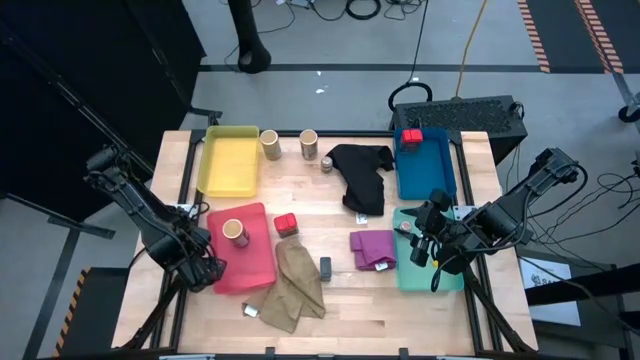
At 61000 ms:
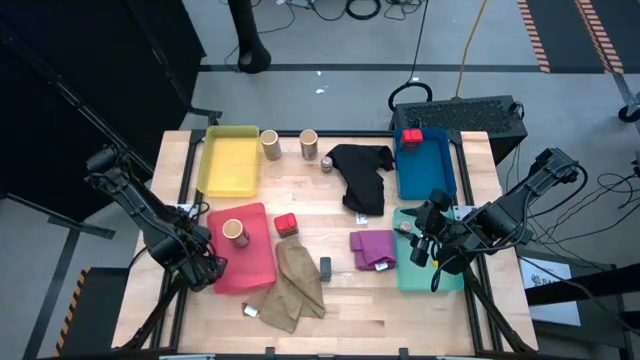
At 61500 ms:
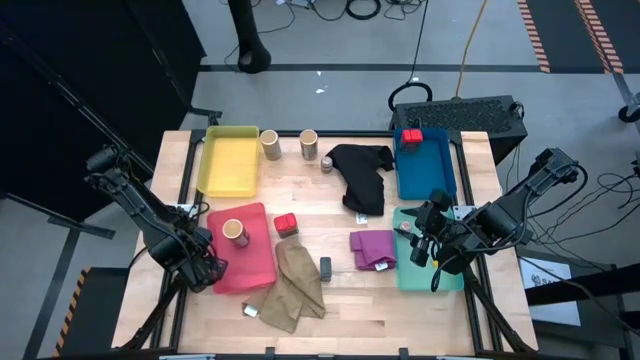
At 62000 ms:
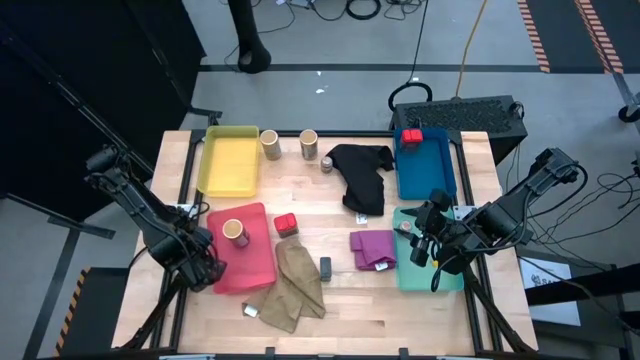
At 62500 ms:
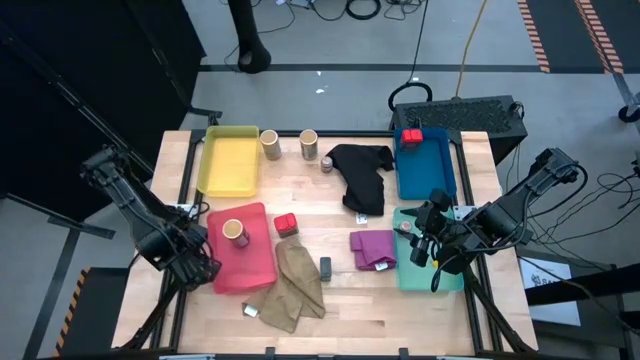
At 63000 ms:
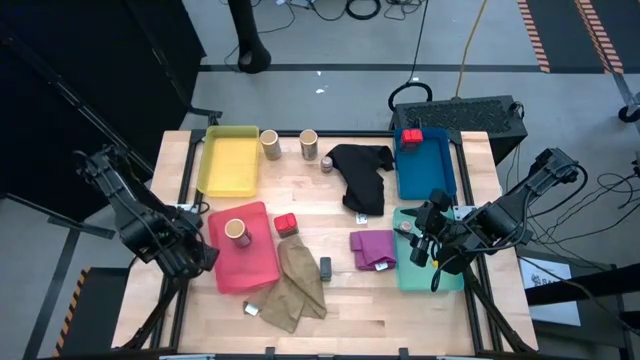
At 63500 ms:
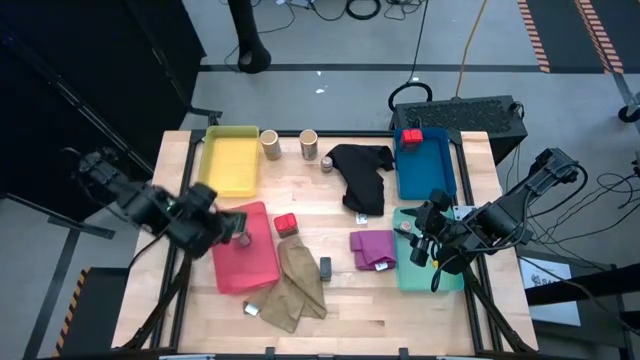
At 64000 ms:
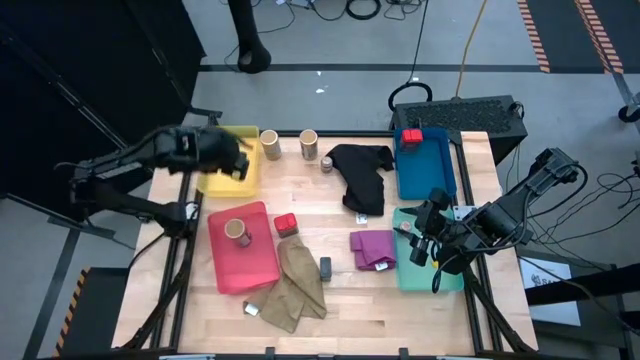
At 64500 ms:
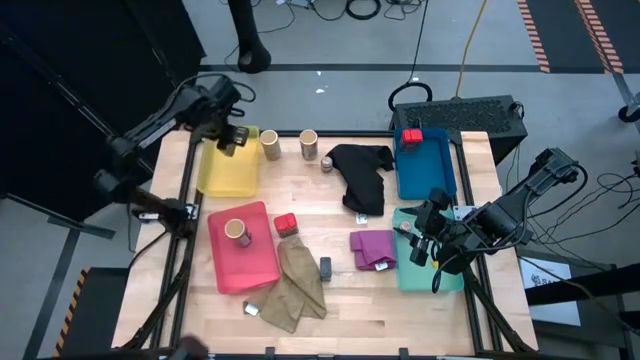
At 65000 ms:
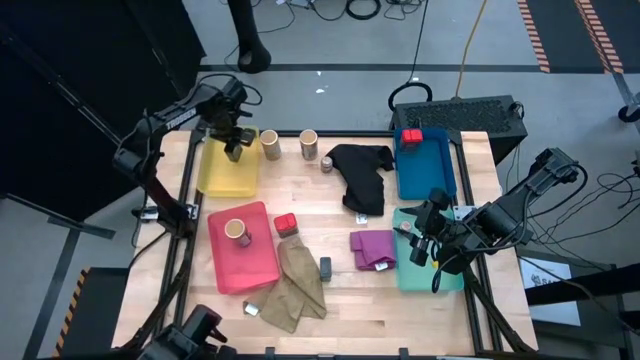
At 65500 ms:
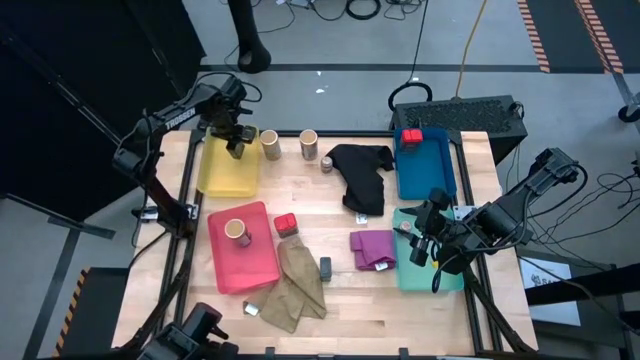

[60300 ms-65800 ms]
Task: Sort spices by type
Put the left black seasoning can into the yellow bin

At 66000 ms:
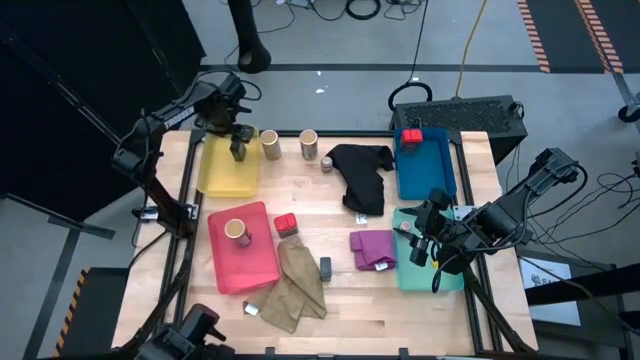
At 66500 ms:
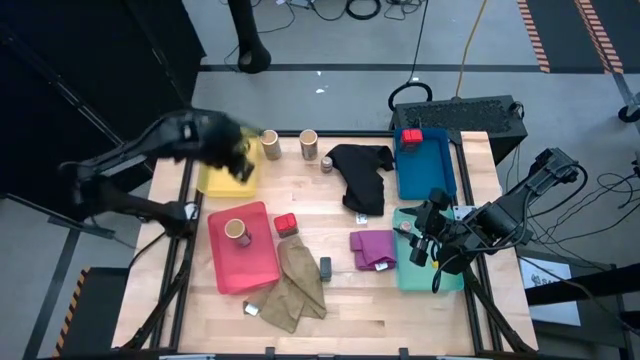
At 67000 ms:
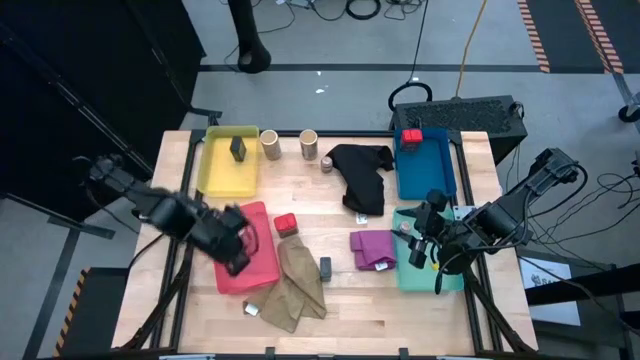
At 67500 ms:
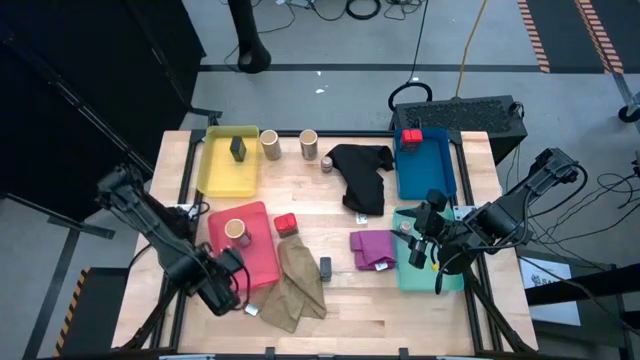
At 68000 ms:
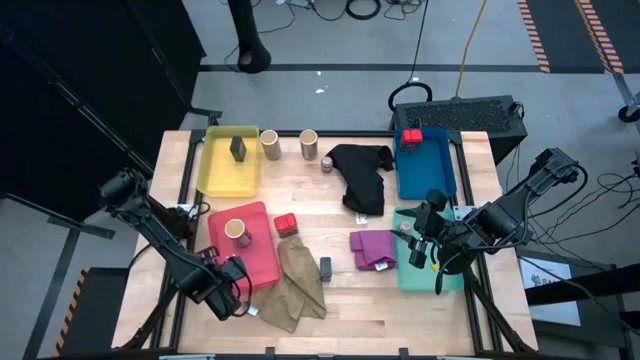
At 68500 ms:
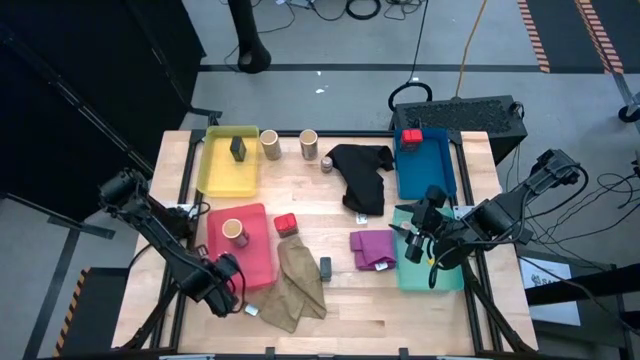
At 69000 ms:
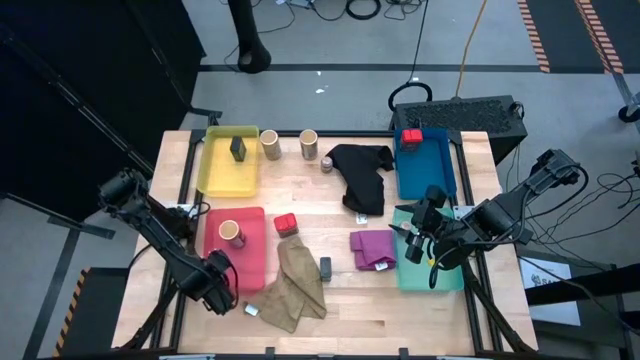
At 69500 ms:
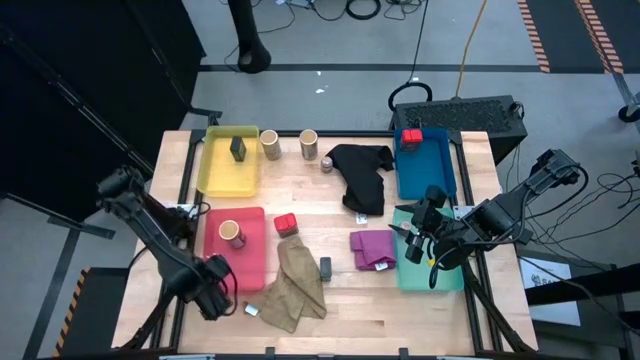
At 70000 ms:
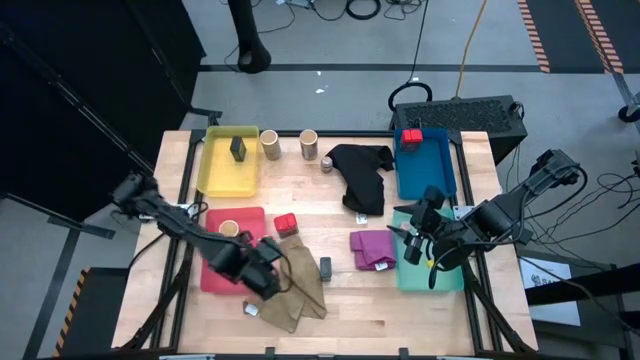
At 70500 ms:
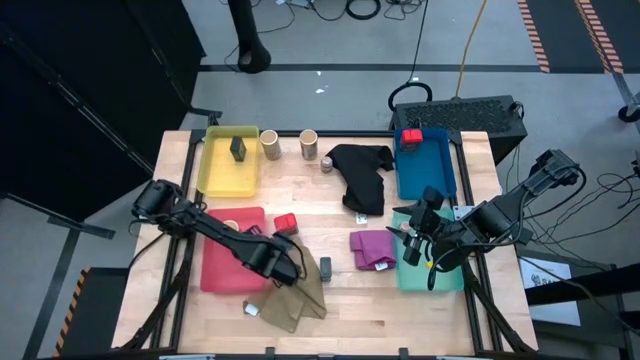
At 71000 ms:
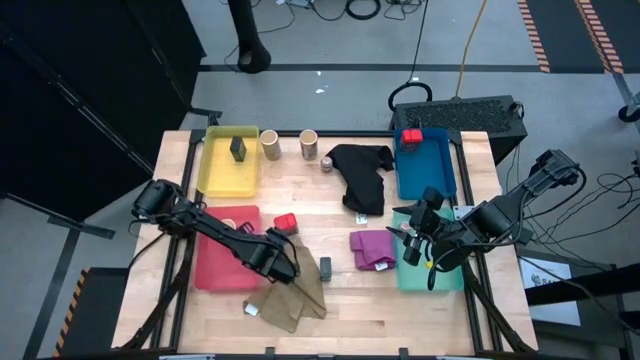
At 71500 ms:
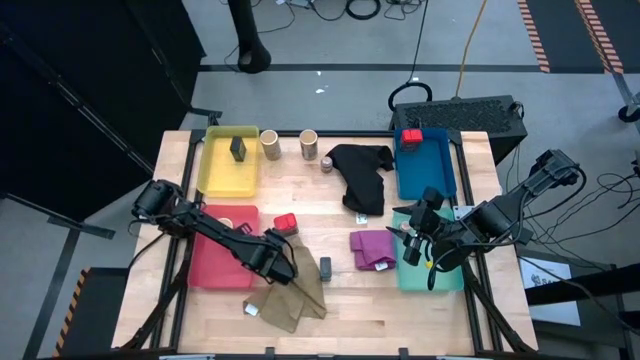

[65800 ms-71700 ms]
Adjust the red bin

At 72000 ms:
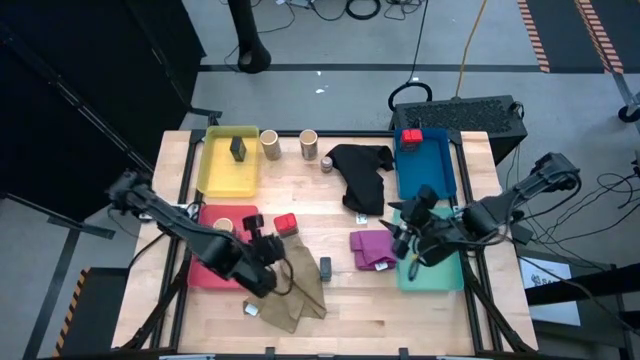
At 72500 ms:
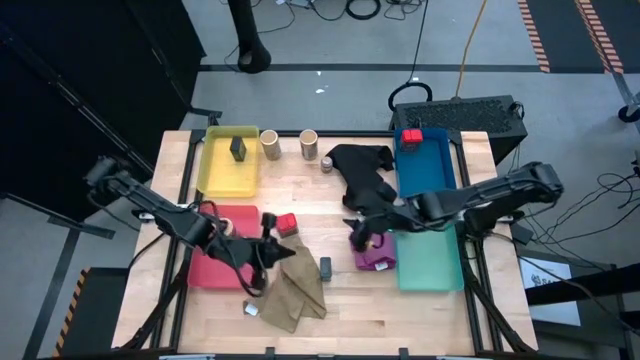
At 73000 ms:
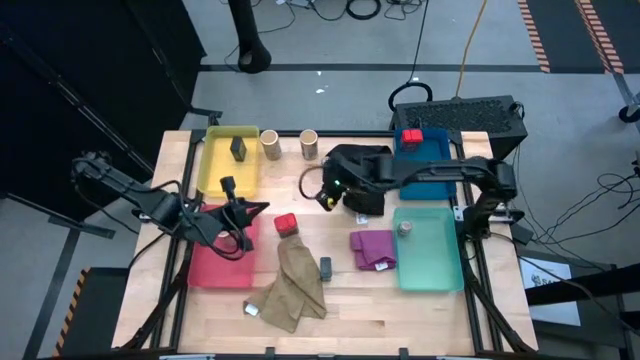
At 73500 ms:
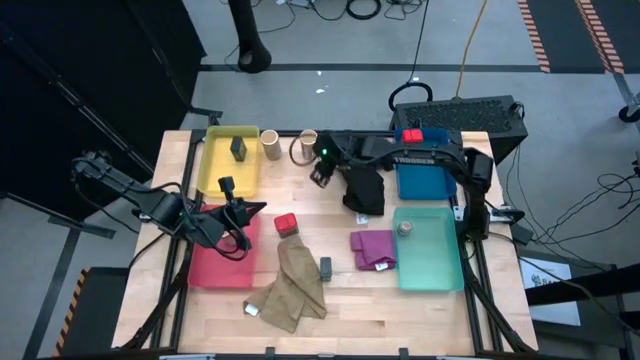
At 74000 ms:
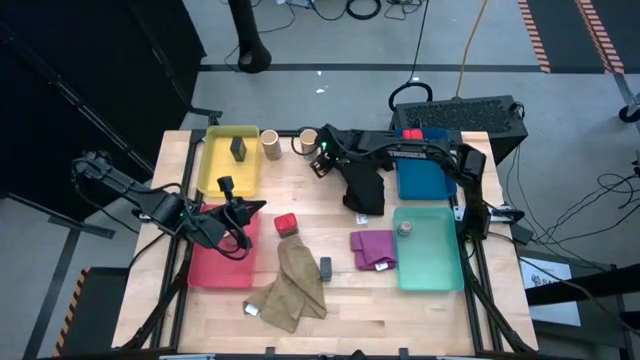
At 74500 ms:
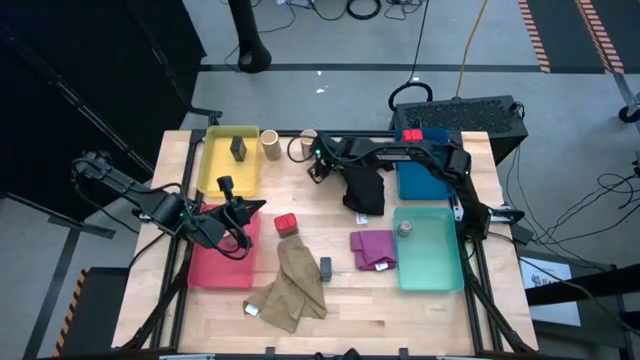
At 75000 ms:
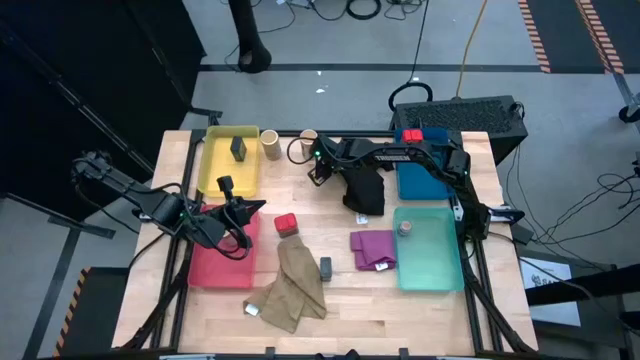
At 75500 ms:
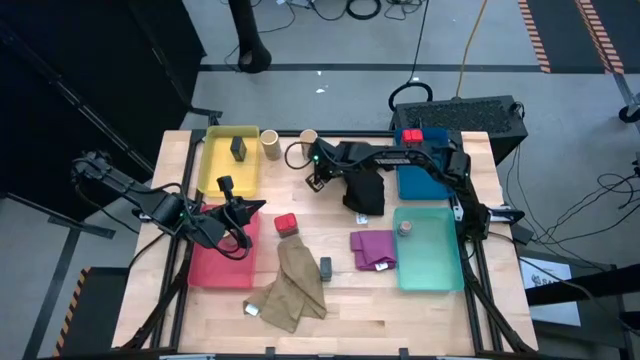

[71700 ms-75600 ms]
Put the brown seasoning bottle into the green bin

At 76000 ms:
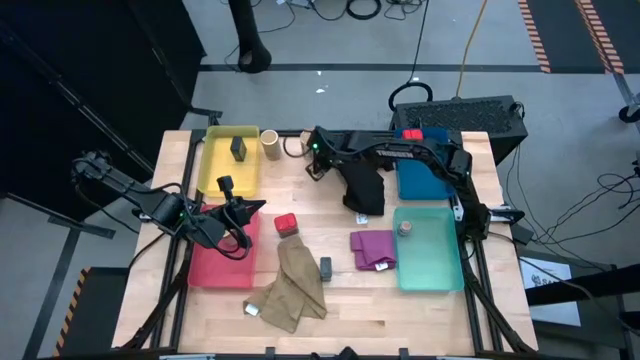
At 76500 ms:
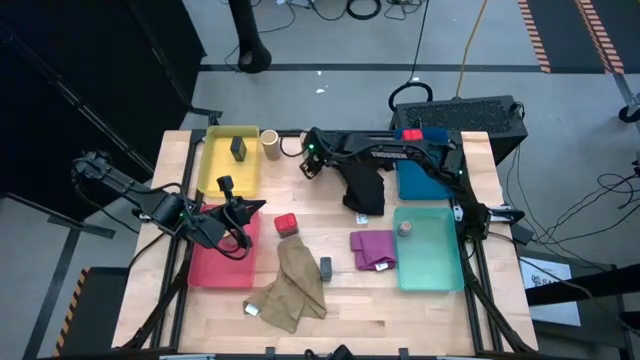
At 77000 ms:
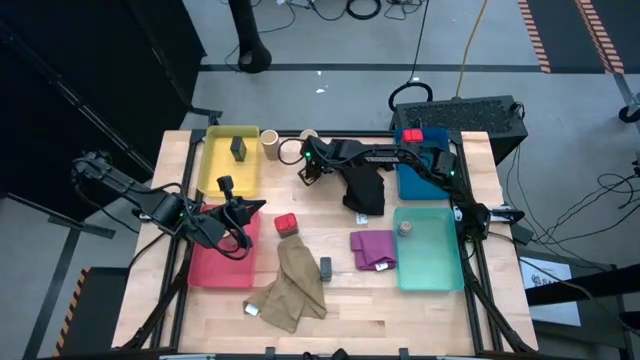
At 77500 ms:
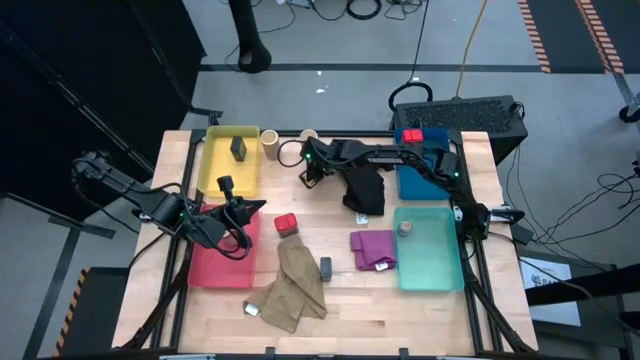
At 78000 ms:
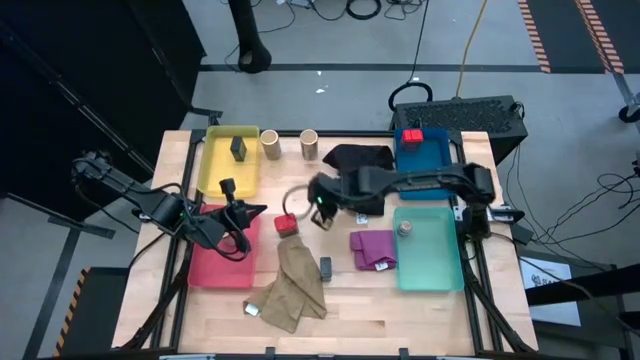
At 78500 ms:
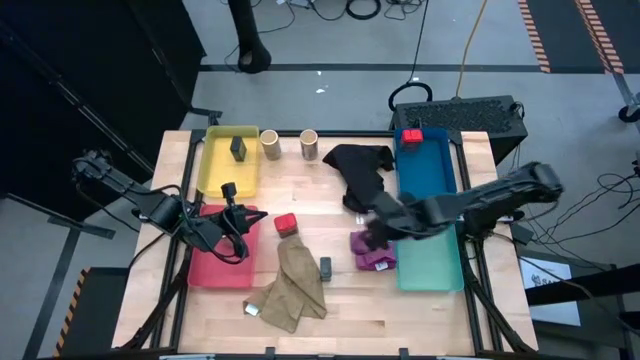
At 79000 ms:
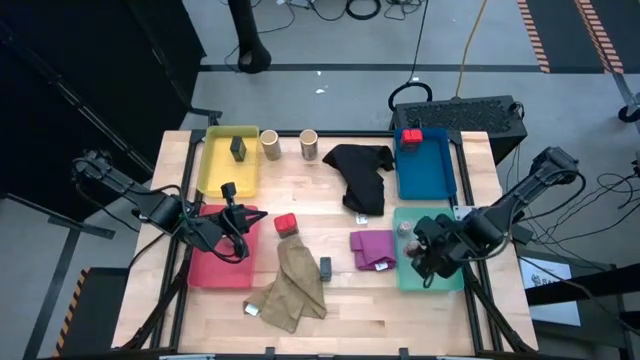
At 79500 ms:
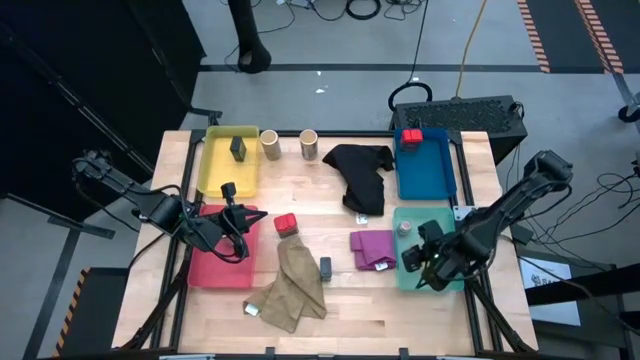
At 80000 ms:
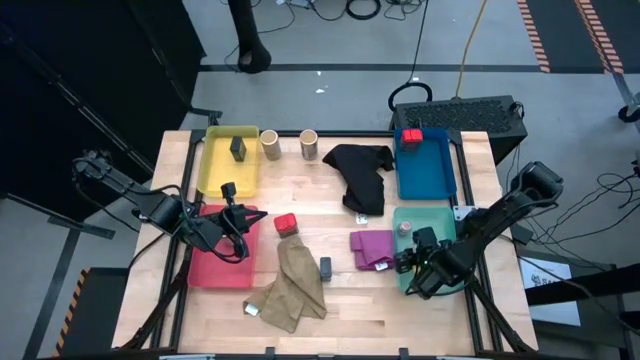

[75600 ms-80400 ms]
Put the brown seasoning bottle into the green bin
